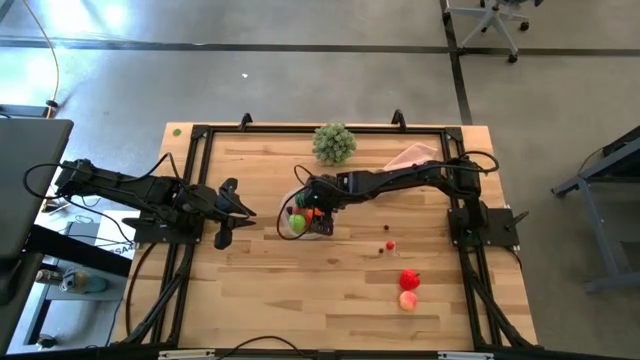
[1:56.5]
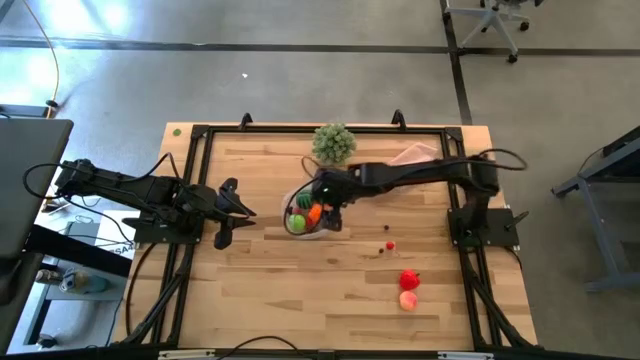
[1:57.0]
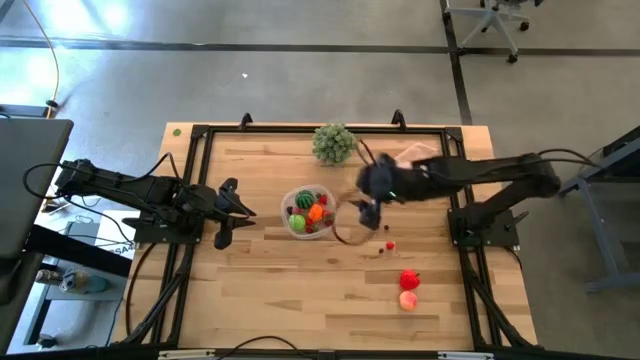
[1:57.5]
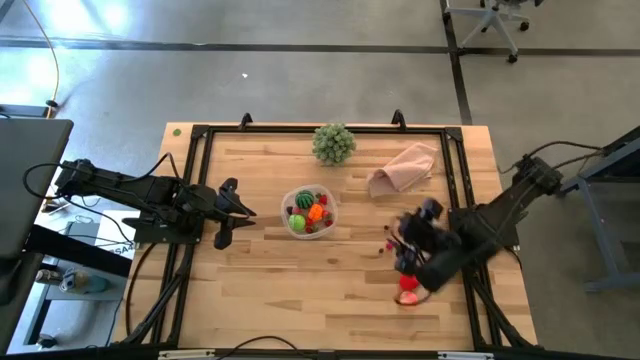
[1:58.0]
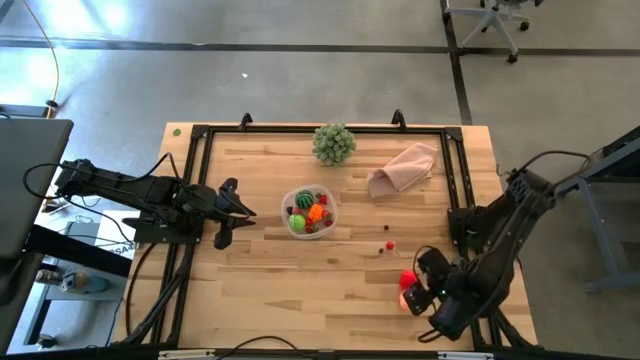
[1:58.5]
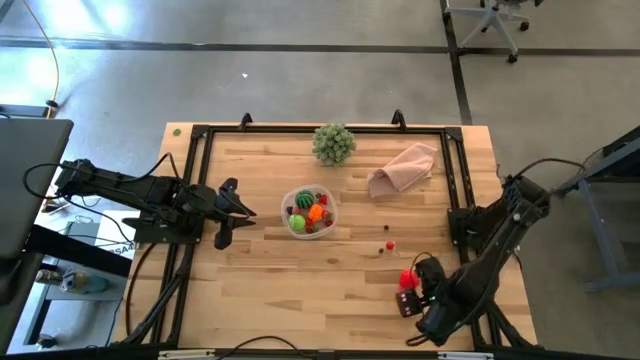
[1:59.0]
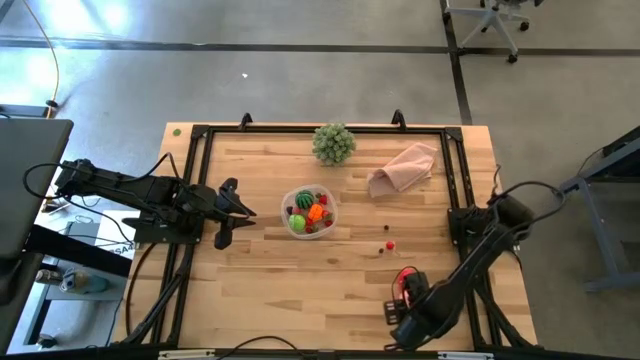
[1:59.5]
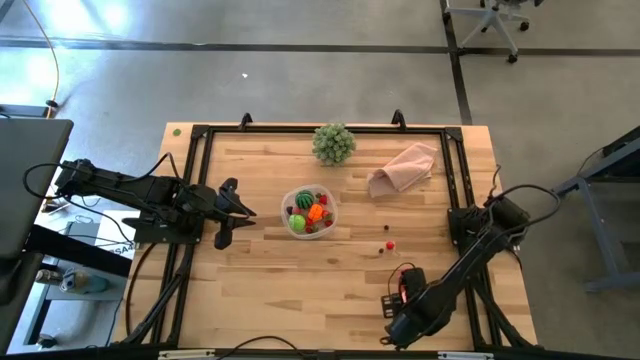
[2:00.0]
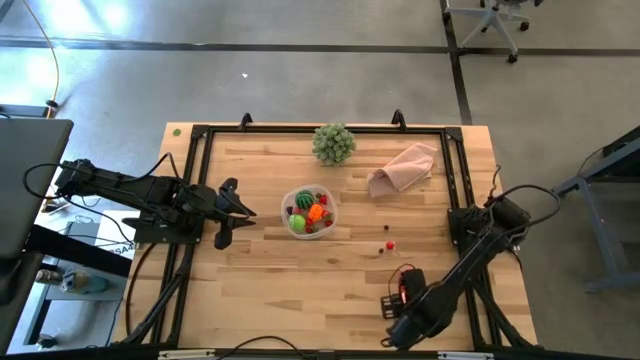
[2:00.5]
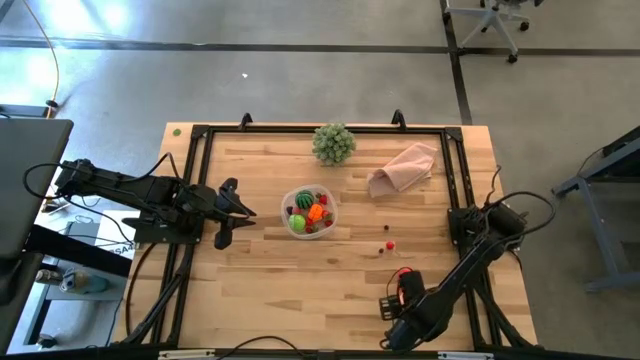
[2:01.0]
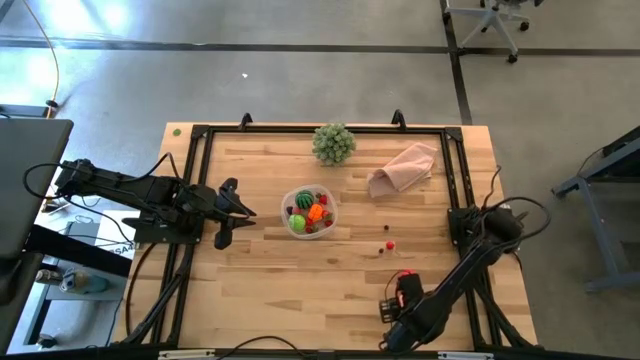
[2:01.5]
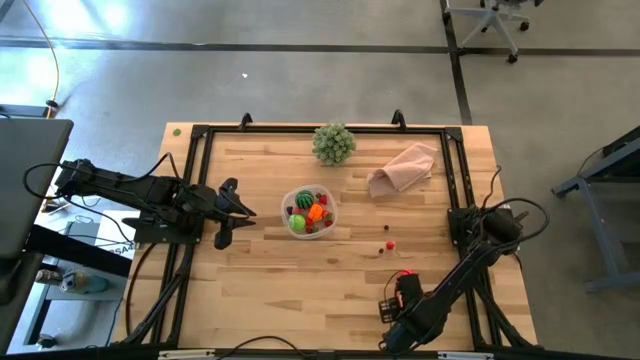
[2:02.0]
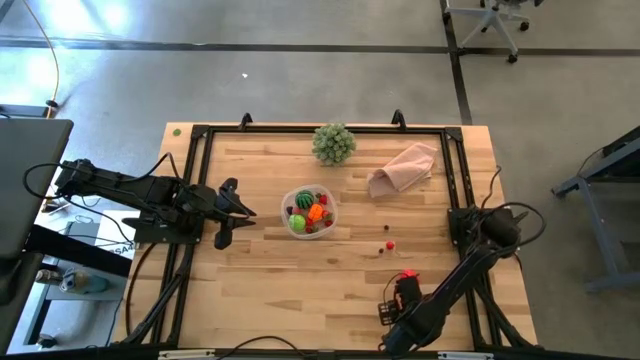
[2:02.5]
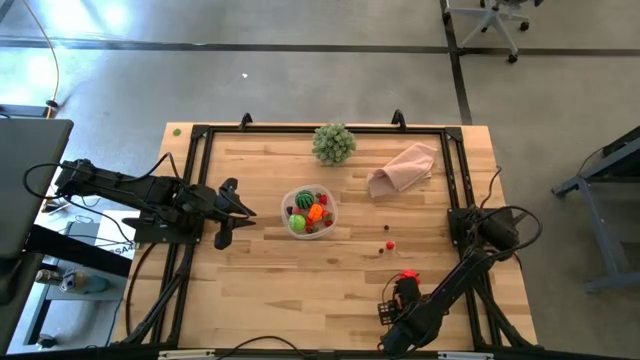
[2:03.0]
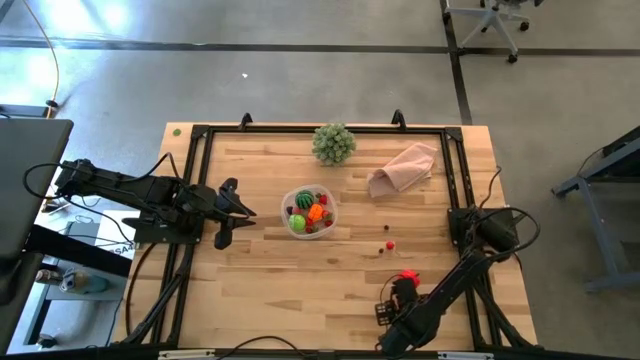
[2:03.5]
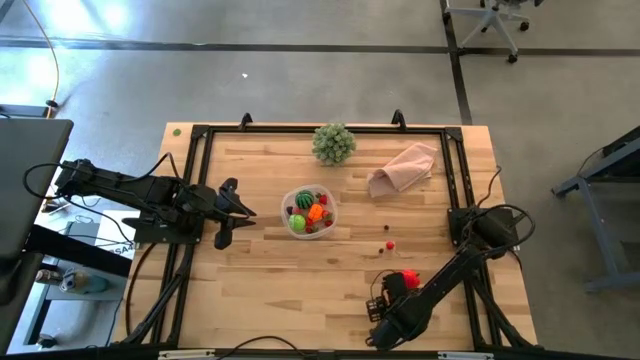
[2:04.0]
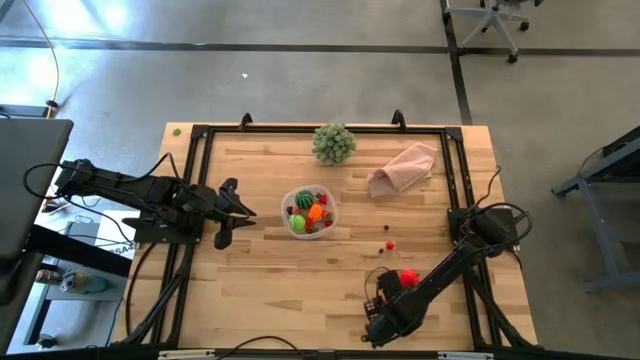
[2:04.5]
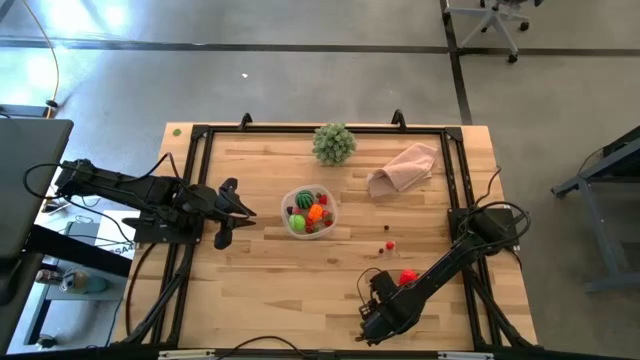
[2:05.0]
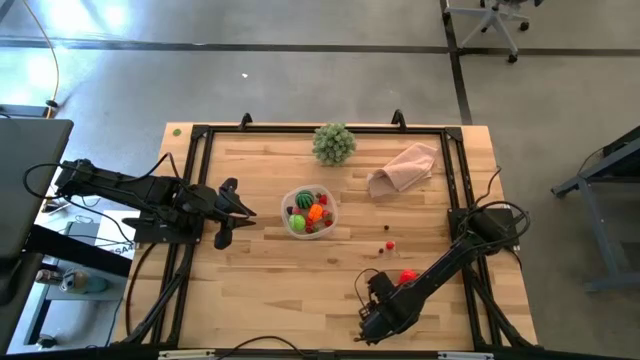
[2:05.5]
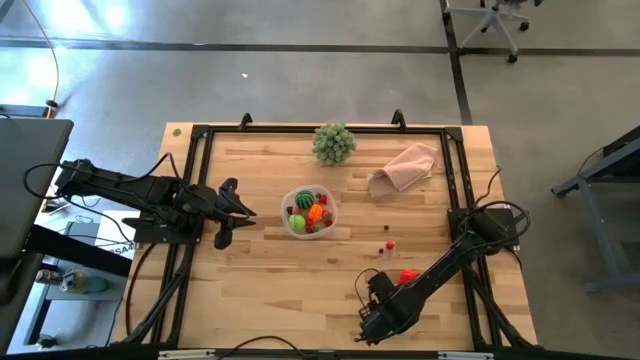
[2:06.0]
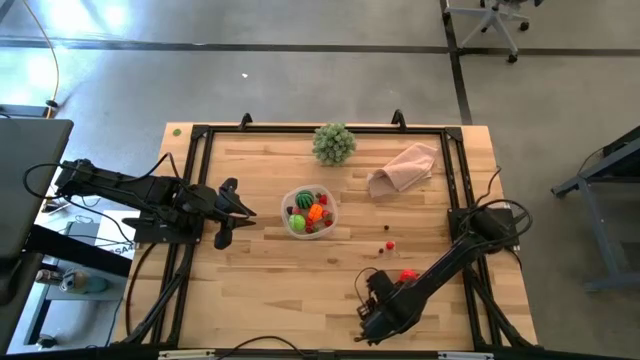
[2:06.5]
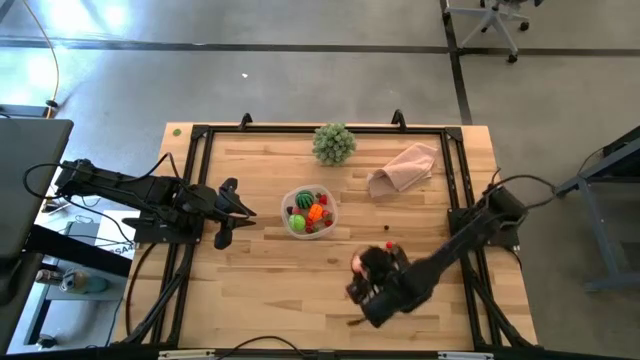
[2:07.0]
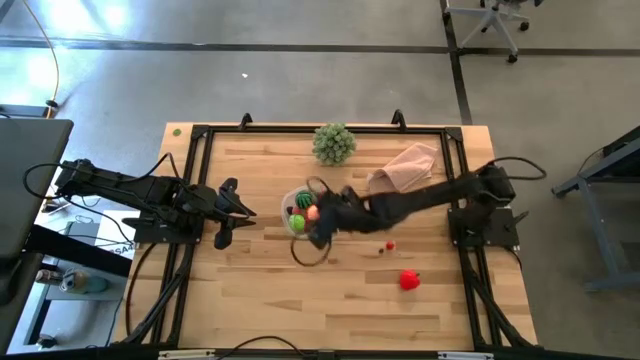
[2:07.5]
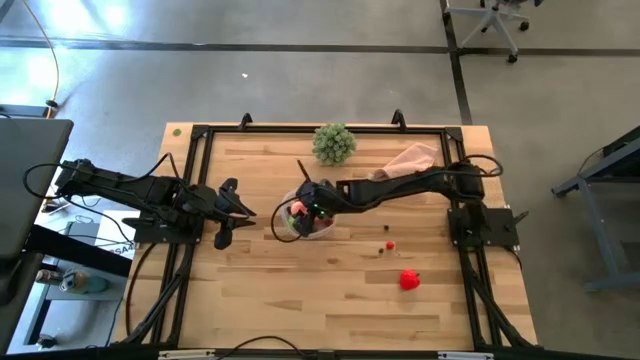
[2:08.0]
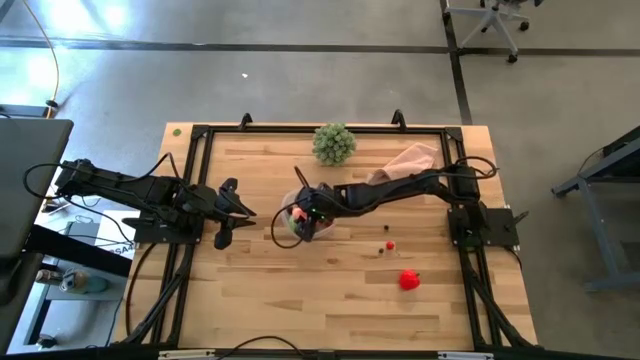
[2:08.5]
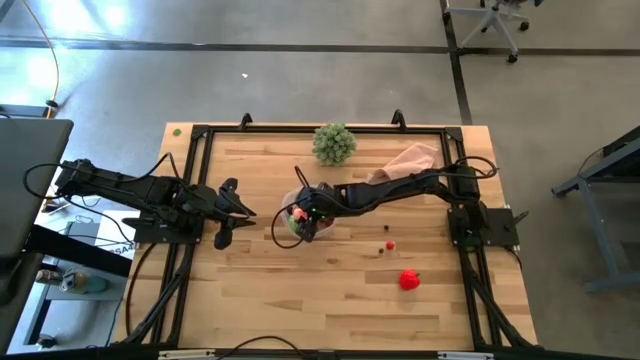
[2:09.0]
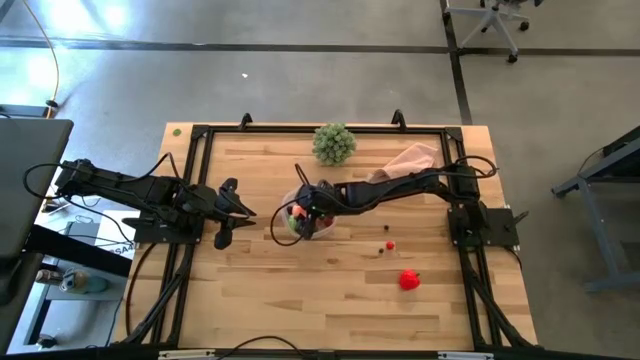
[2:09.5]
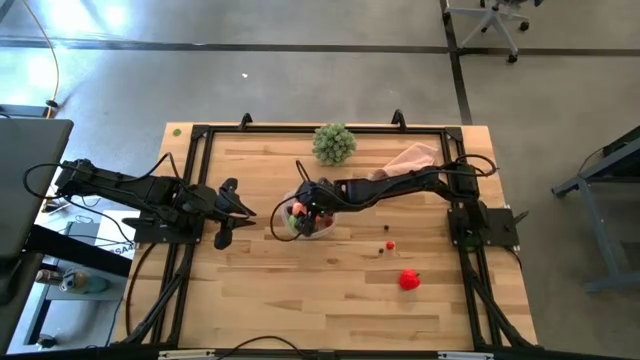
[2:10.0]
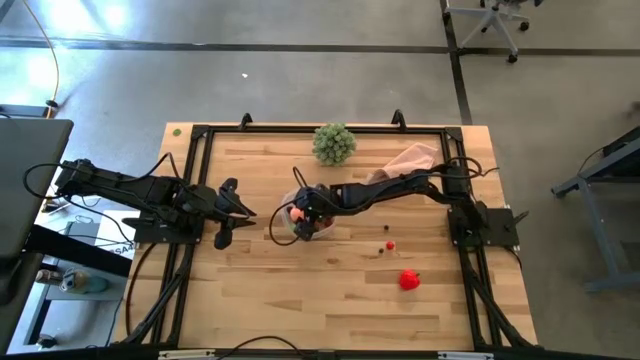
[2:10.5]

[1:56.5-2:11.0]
Task: Pick and placing Produce into tupperware
Put the pink peach into the transparent bin

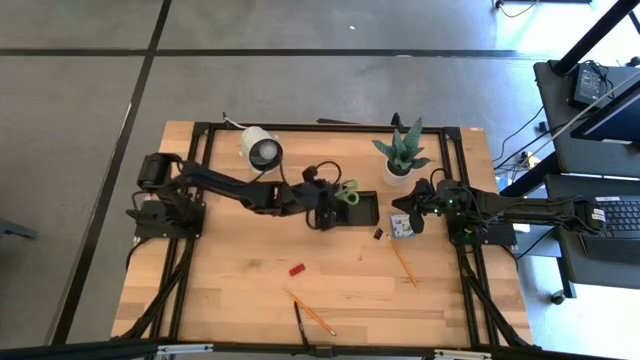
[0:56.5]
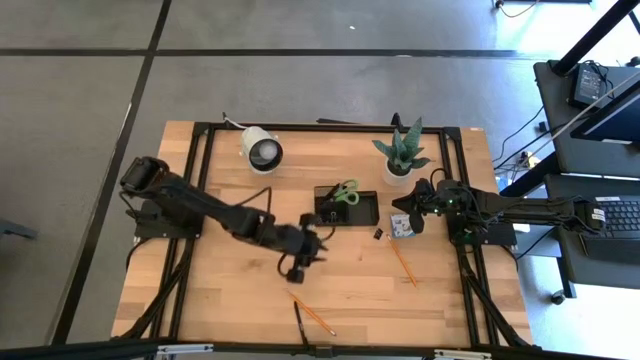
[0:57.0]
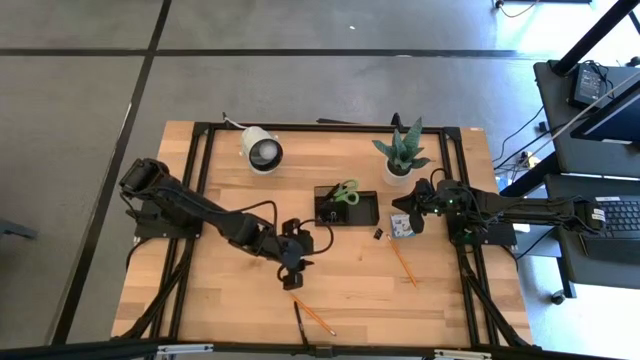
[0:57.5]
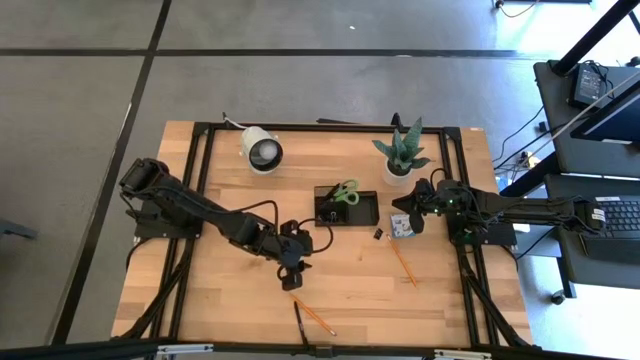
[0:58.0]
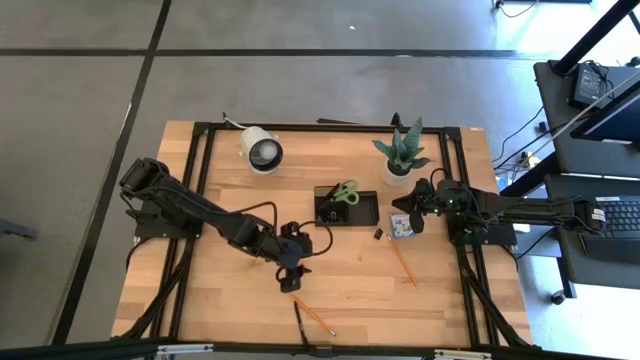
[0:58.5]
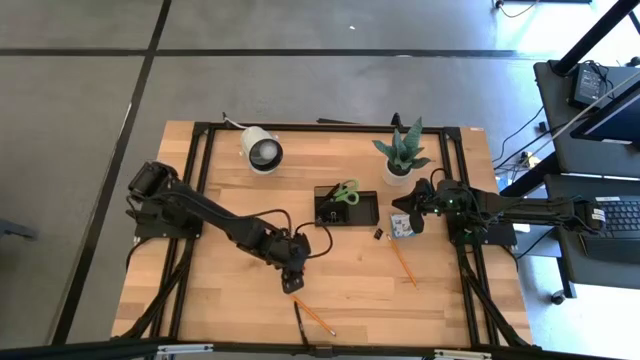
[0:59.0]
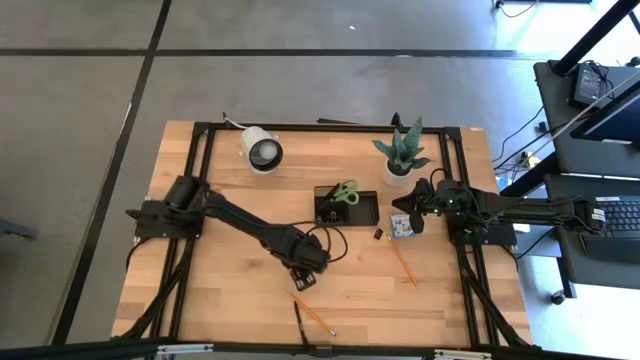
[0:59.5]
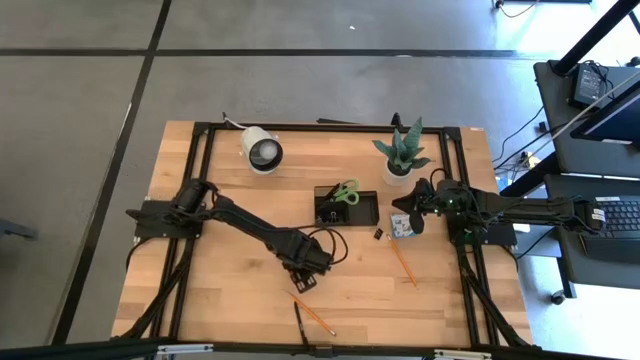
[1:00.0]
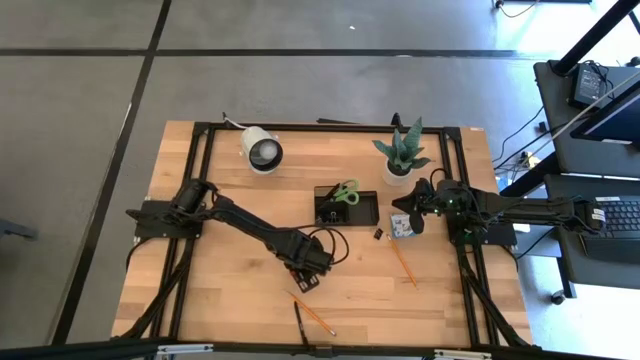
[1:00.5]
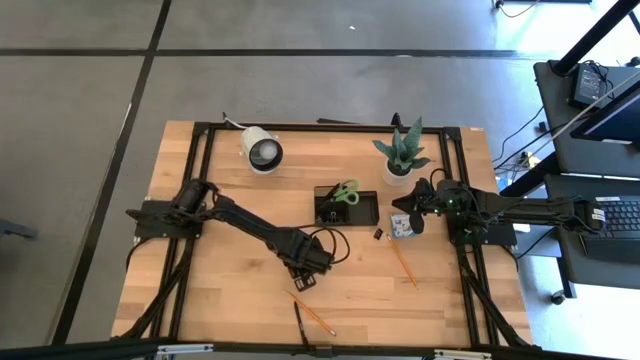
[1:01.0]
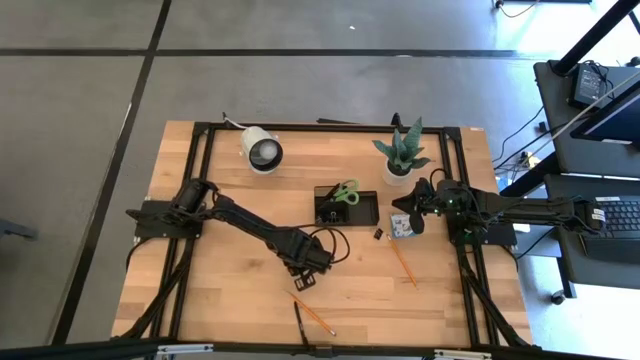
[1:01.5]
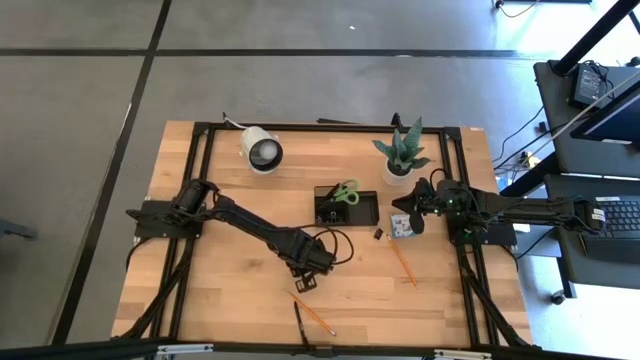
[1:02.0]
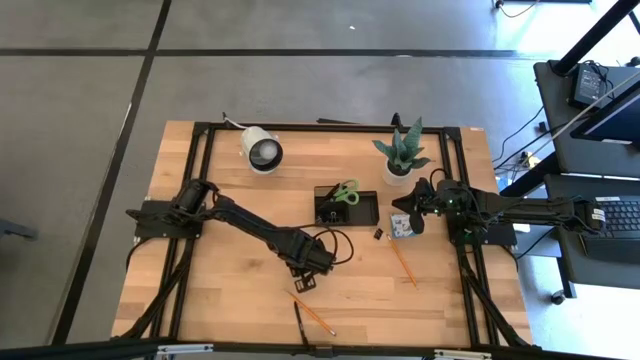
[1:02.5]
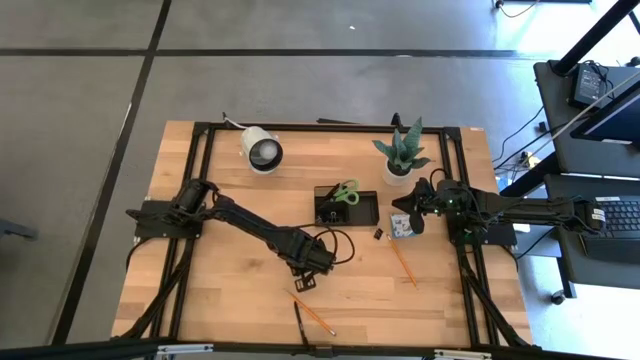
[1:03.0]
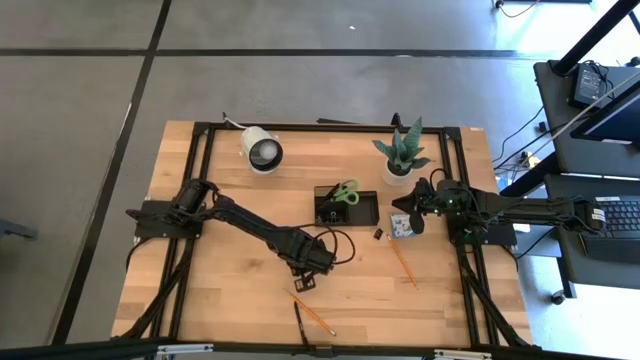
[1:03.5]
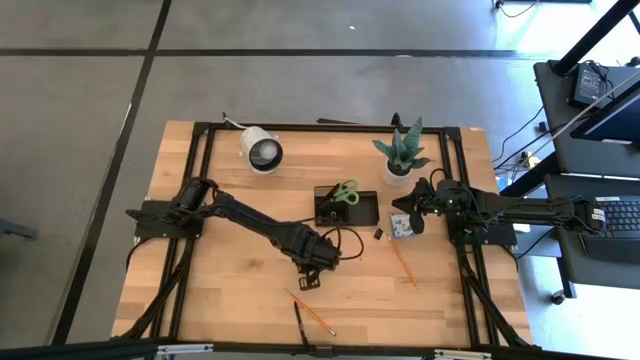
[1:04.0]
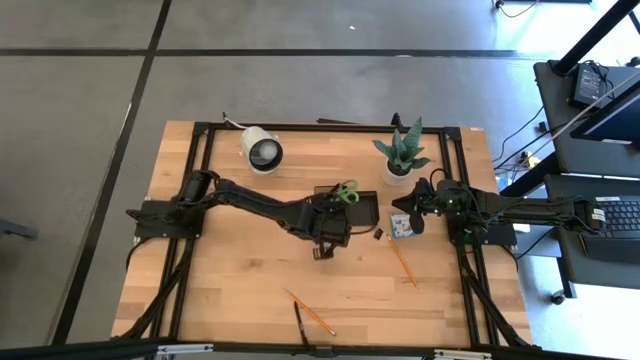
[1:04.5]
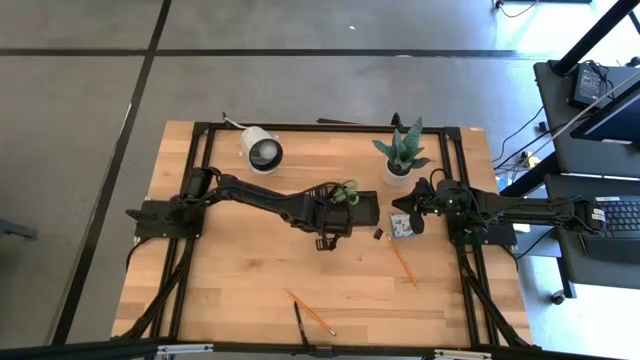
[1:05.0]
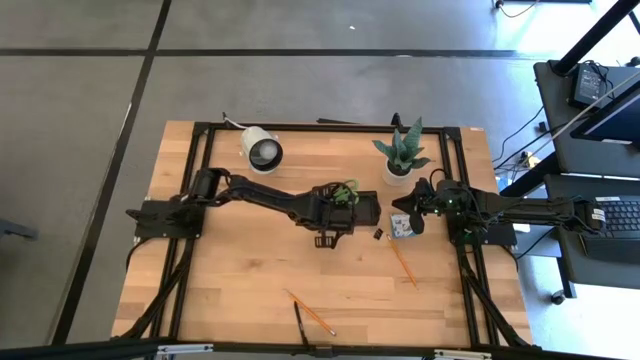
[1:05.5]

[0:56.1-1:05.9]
Task: Pick and place office supplies into organizer
Put the red eraser in the desk organizer
